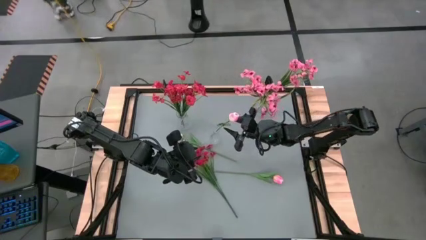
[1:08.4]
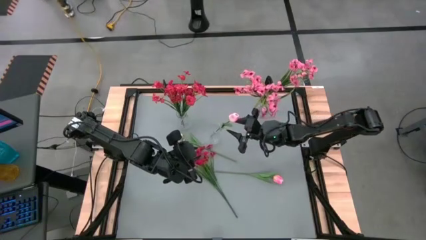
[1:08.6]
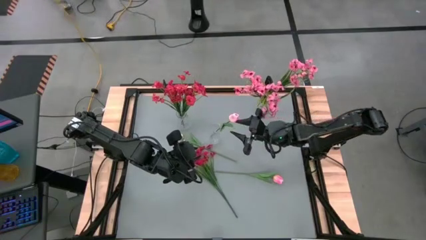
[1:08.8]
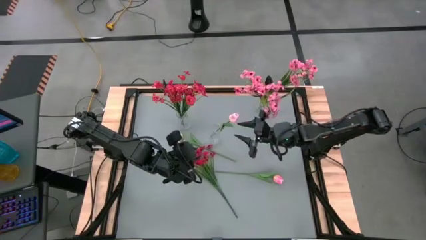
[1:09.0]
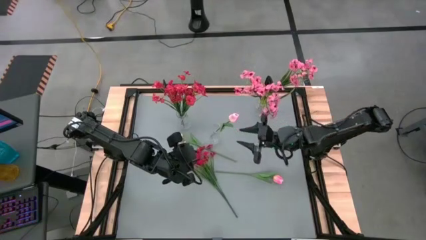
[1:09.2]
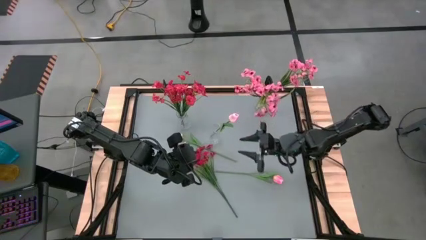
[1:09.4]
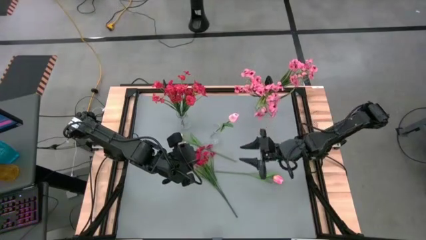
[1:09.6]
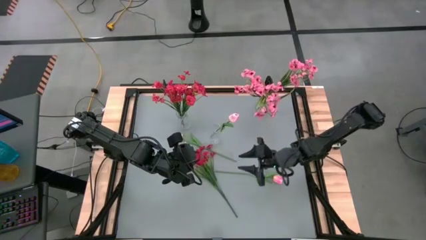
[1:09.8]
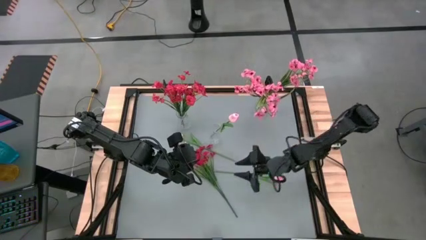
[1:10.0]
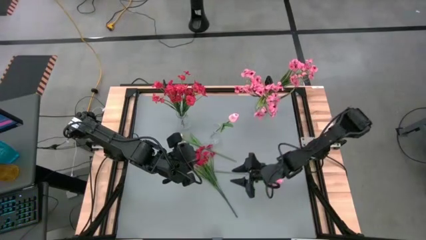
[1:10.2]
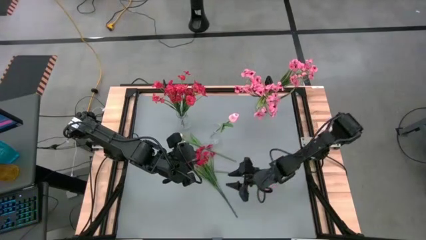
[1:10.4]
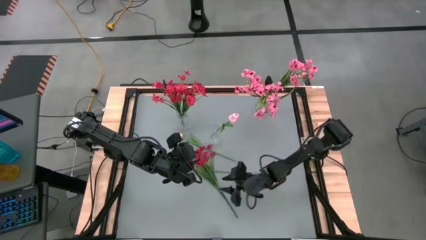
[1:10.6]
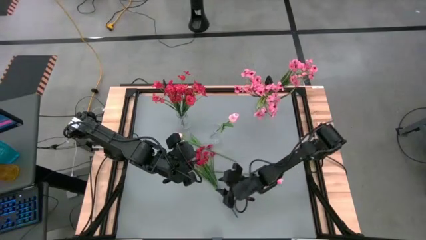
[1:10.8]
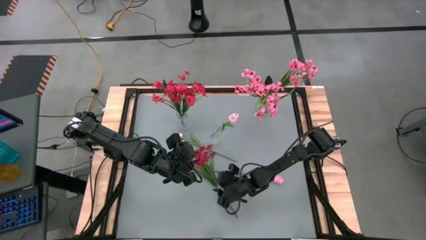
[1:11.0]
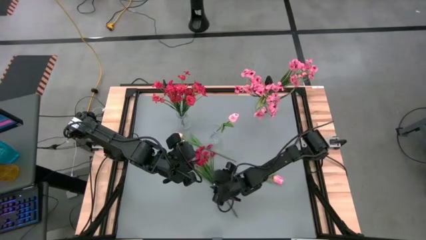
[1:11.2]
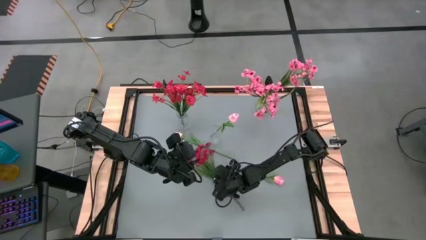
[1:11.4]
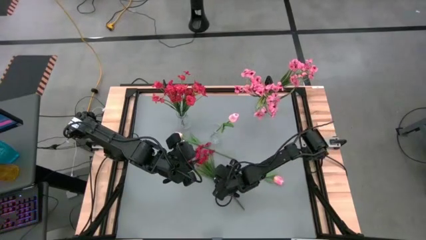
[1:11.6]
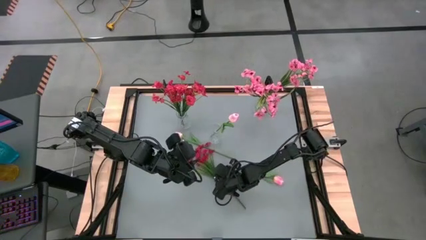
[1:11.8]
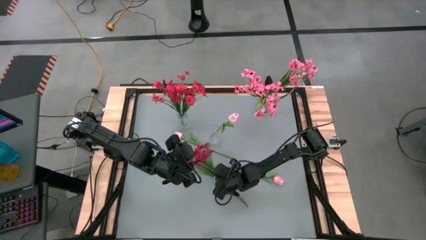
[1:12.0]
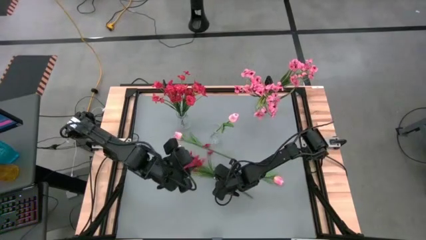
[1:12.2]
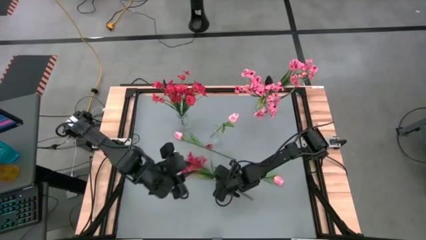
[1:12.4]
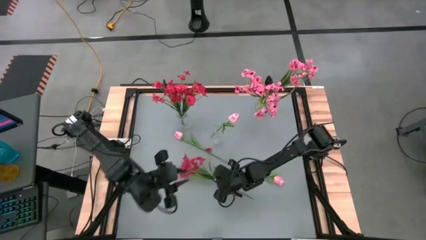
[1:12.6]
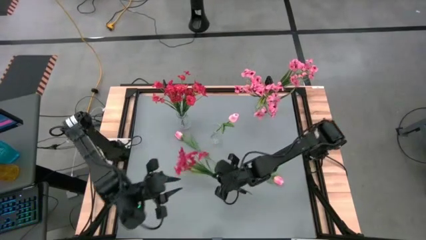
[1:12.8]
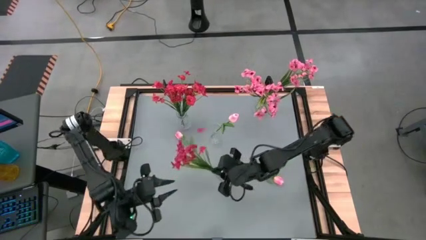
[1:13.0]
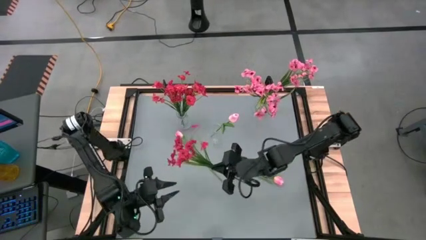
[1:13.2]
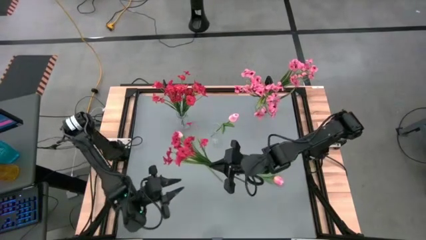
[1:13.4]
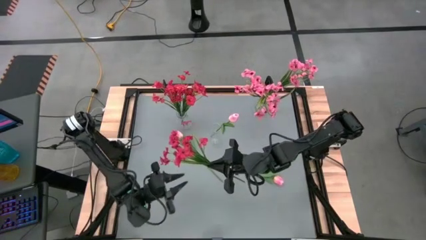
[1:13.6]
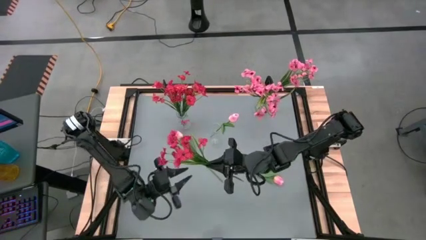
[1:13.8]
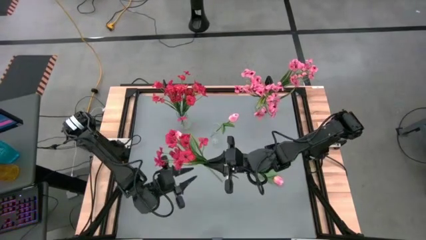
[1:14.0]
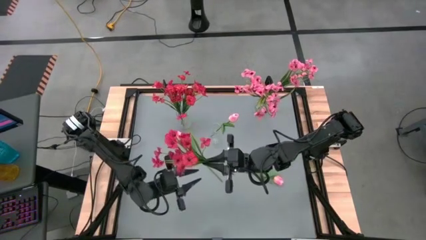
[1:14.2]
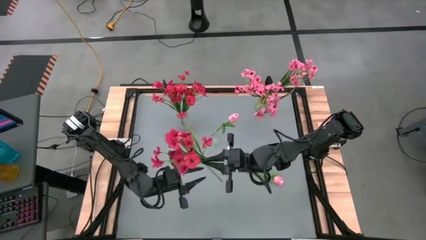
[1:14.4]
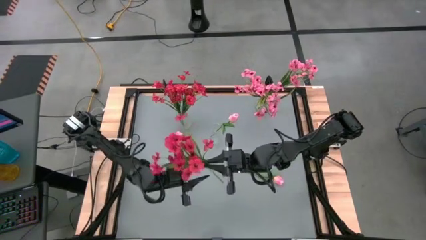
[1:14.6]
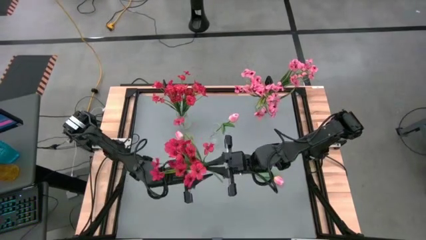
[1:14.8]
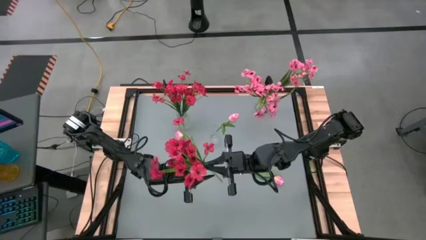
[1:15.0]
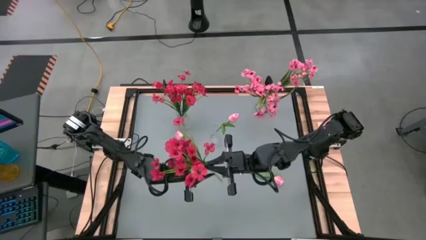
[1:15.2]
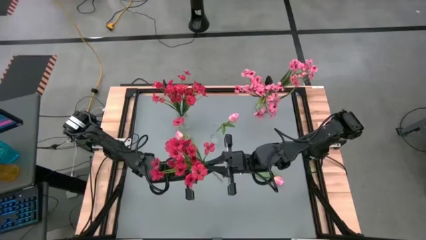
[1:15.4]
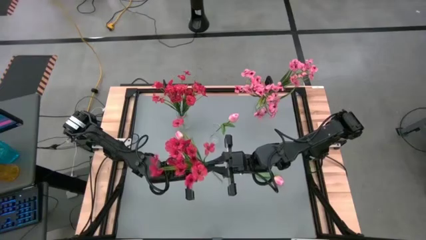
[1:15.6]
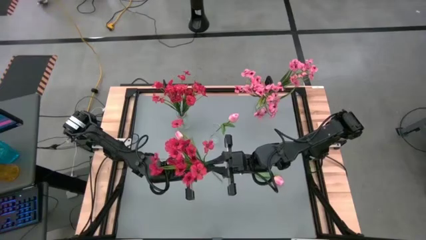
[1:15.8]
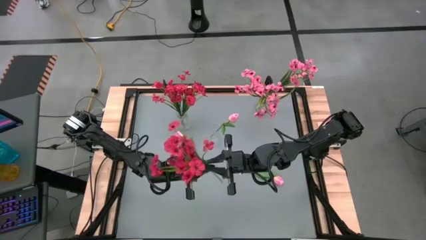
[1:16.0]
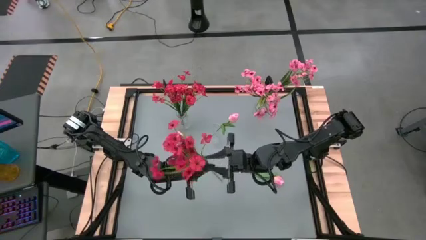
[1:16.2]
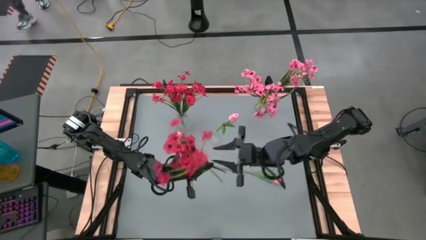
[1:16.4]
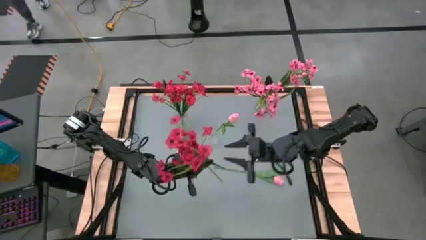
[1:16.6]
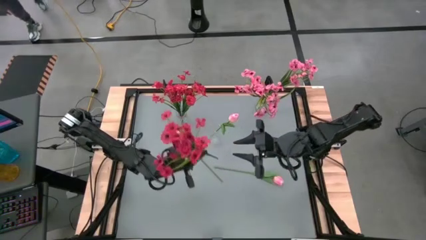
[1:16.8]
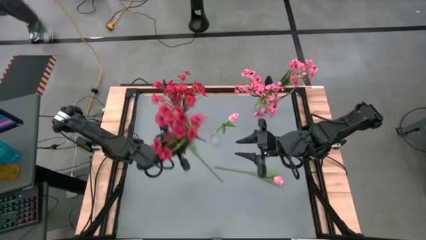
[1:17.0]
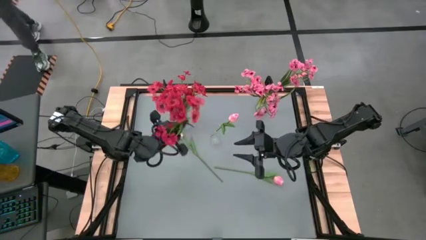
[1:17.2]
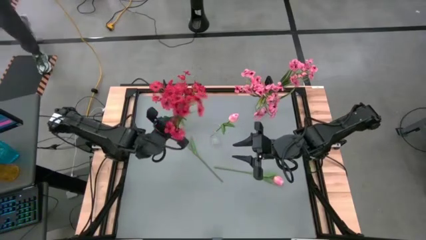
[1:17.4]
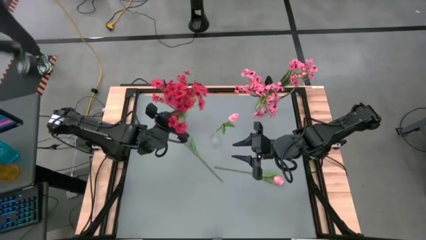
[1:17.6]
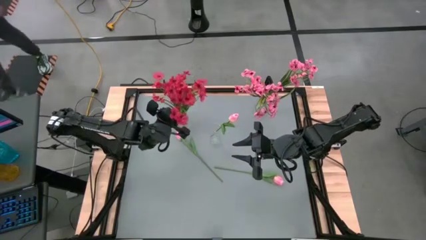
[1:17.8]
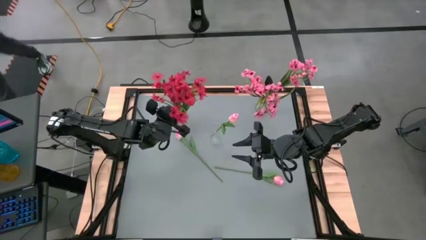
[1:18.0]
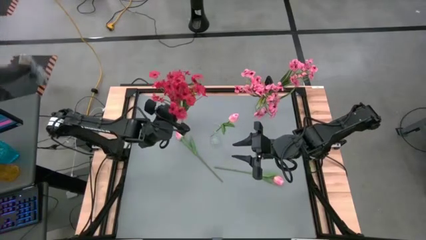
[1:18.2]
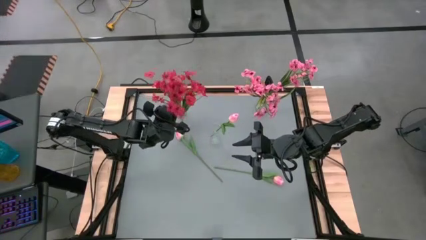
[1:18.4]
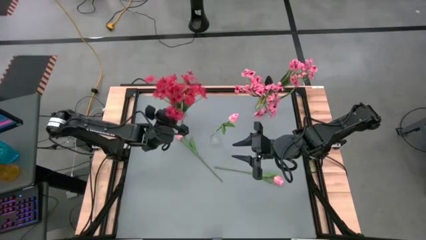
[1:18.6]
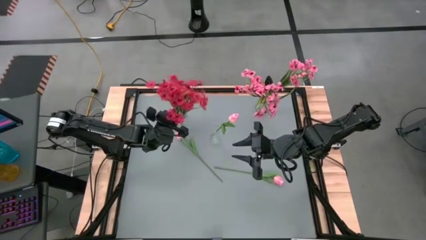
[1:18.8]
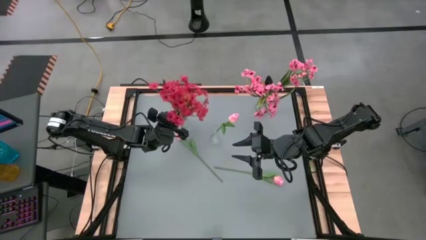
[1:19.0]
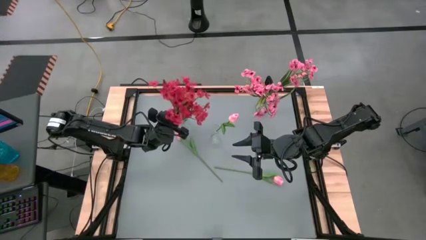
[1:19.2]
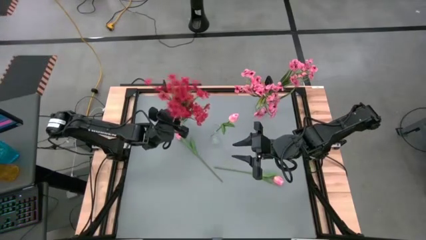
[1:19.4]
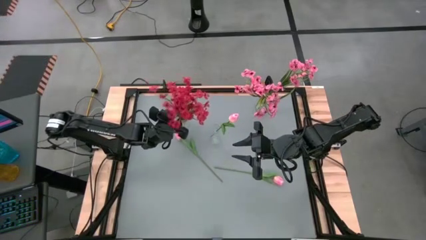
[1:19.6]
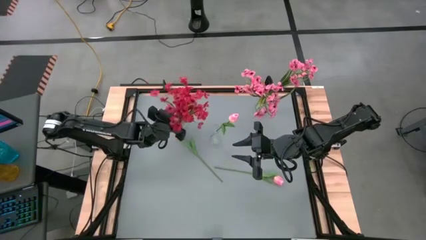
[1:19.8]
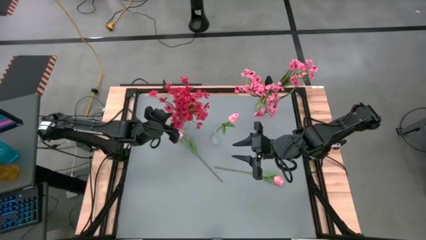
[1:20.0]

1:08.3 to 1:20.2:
Task: Sort flowers into vase by color
Put the red flower into the top left transparent vase
